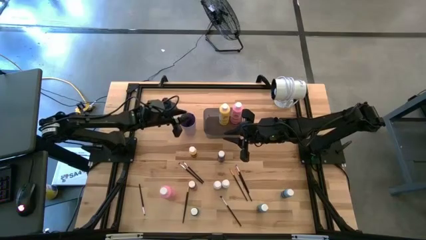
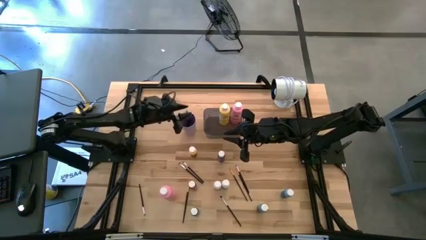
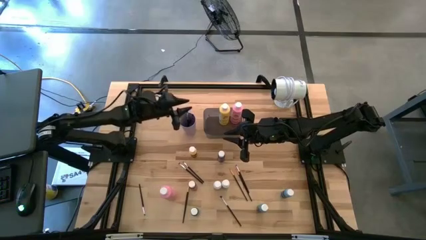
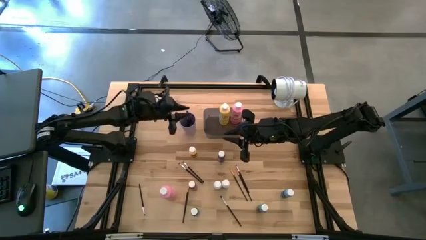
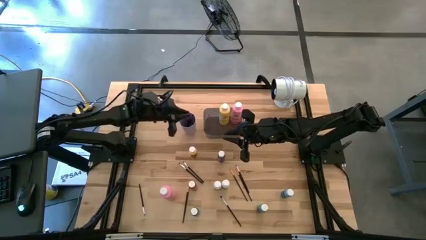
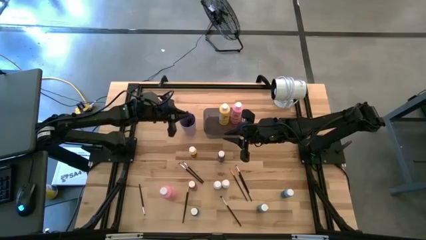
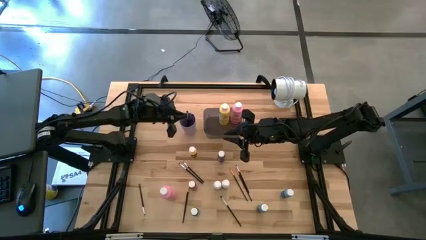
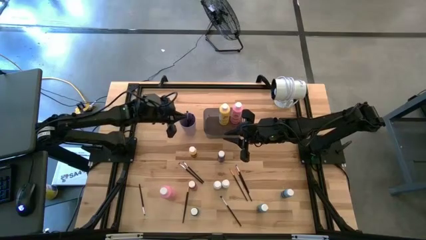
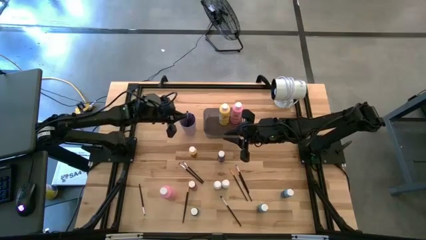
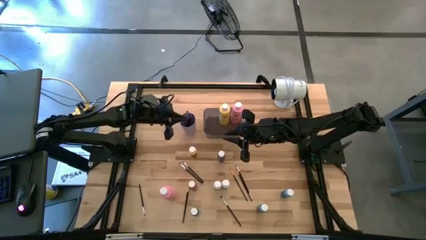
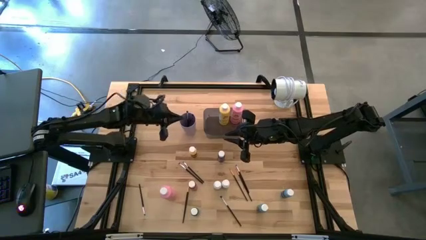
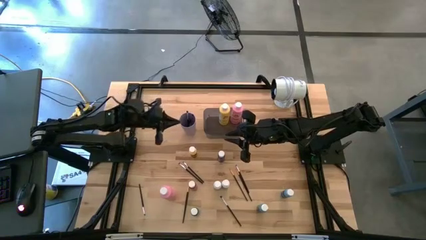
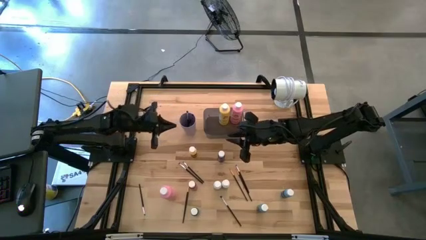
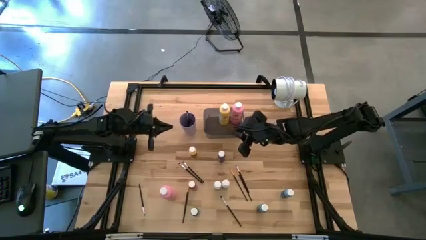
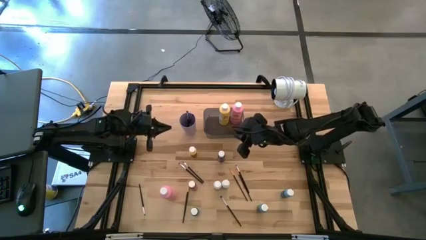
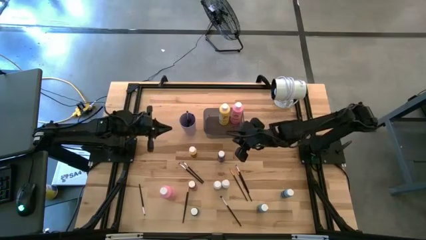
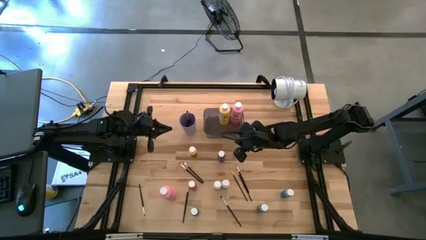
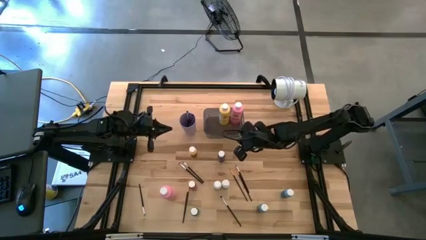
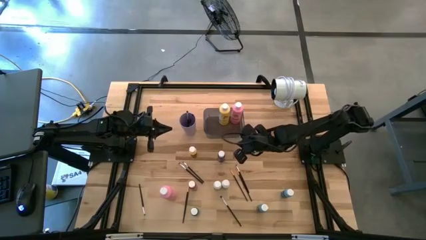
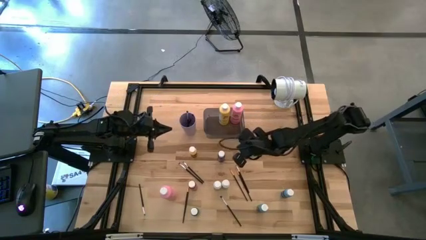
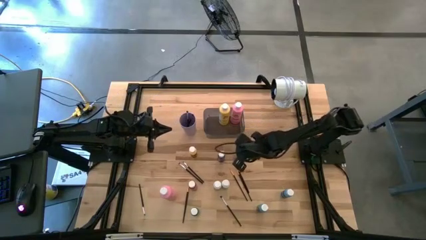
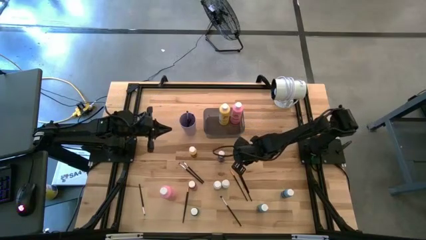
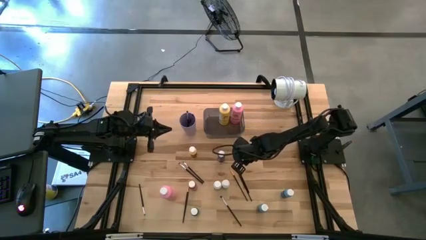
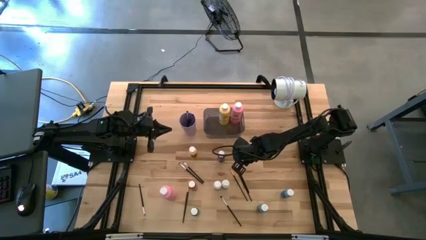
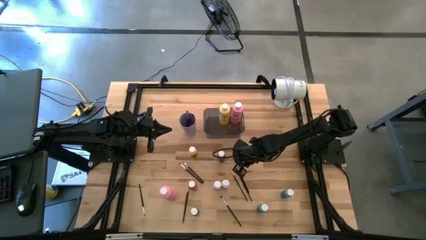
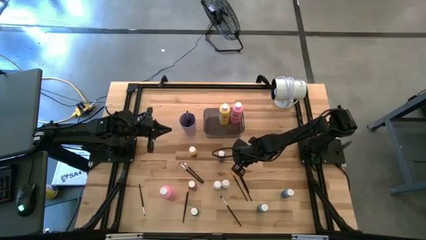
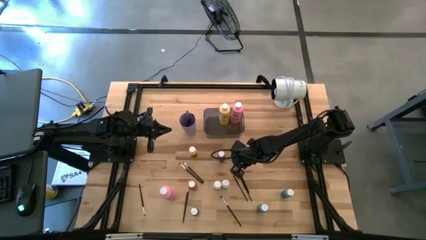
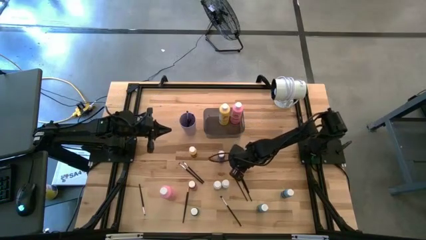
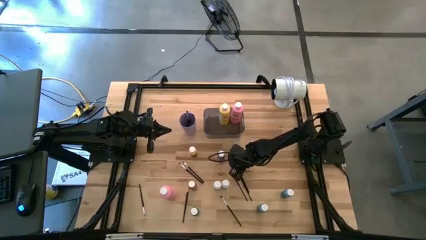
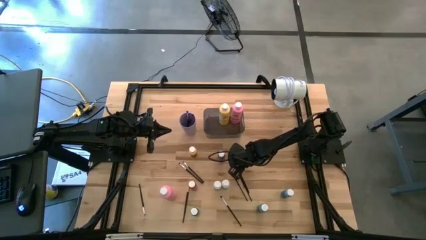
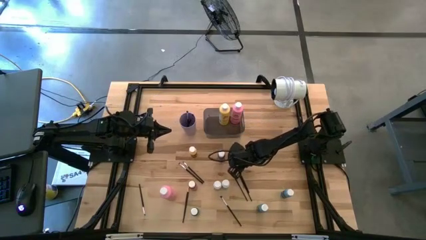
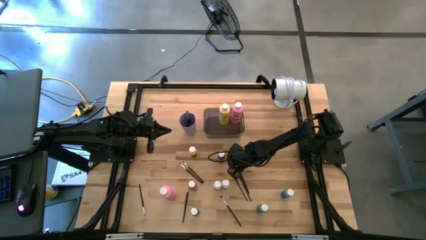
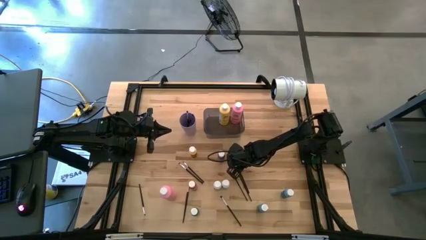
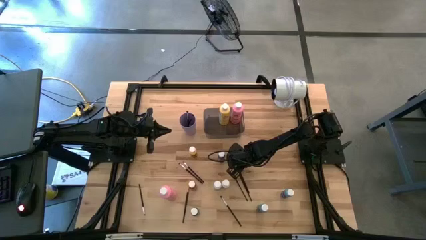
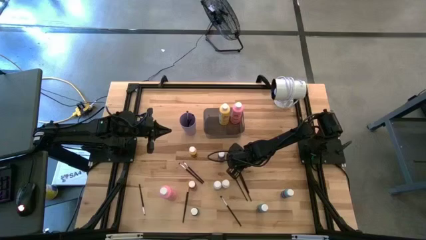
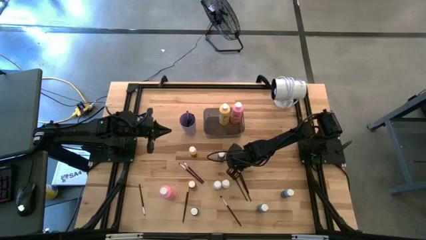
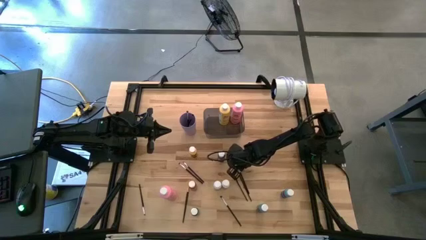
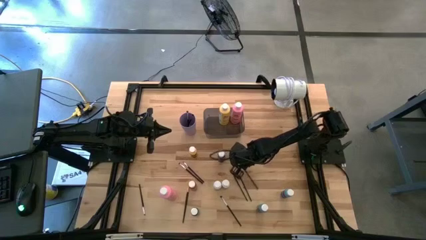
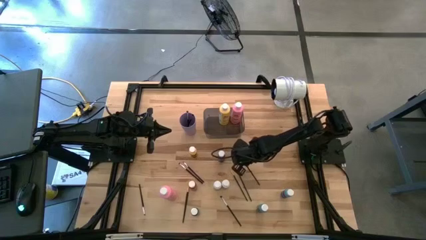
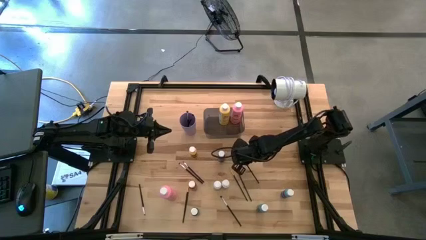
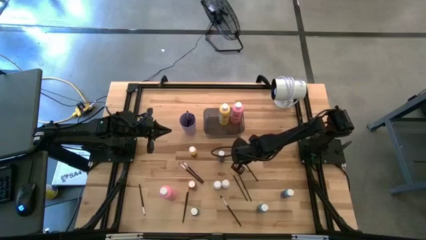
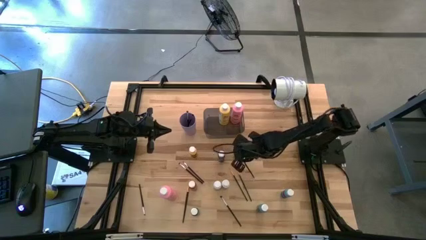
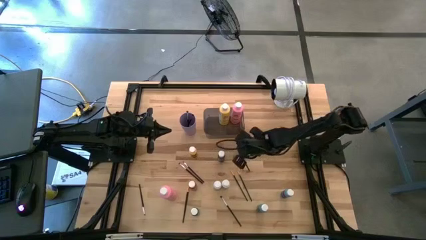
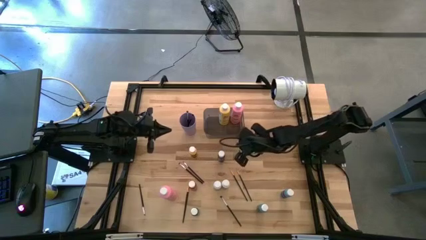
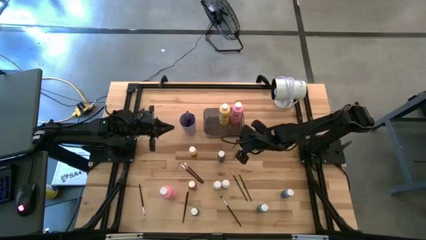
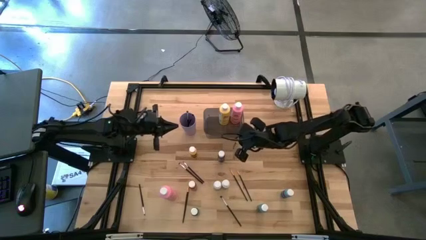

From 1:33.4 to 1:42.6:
Task: Pick & Place Paint Supplies
Put the gold paint brush into the purple cup

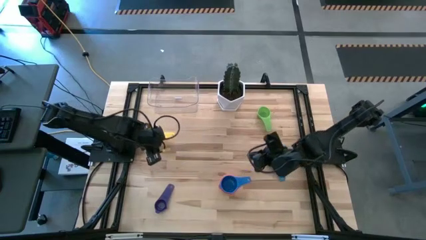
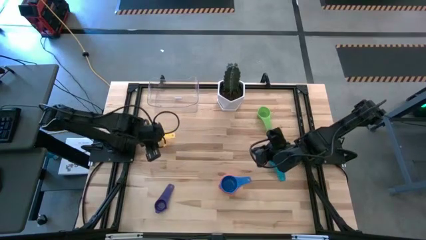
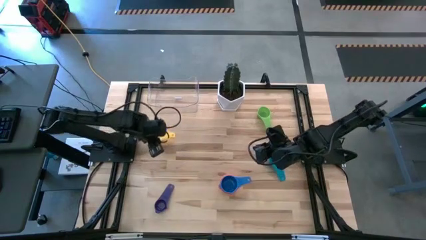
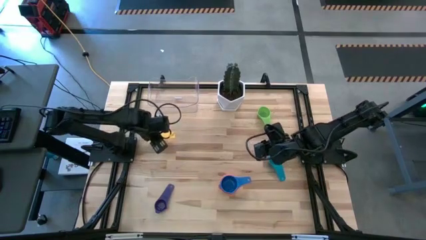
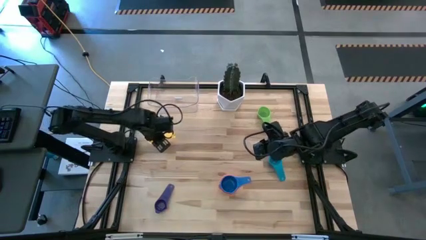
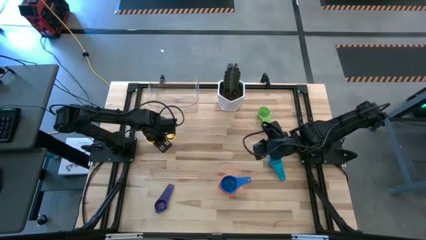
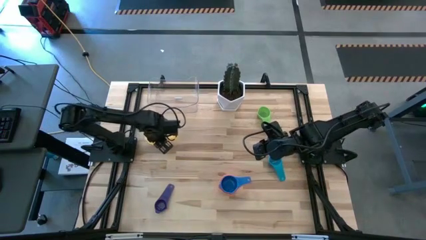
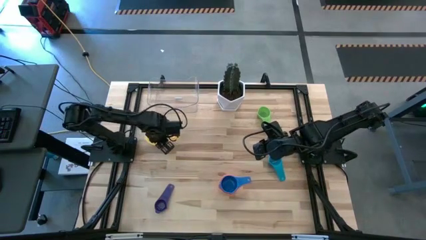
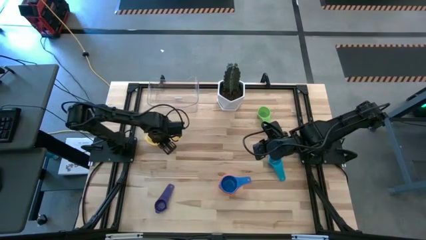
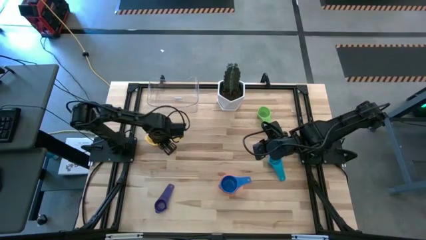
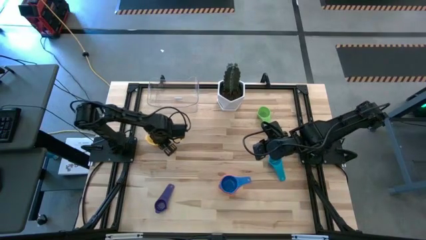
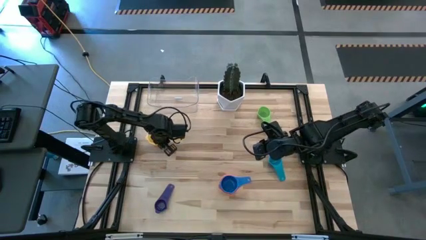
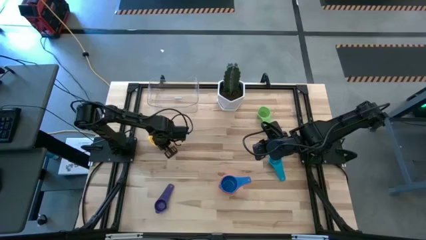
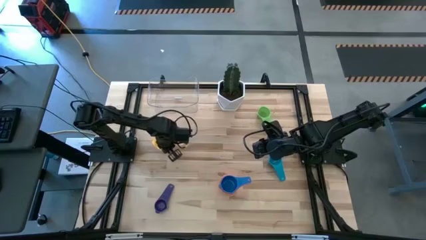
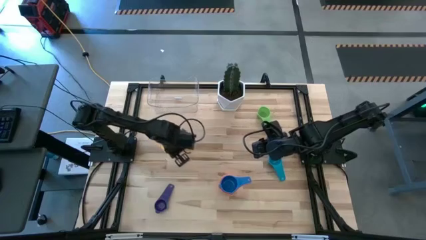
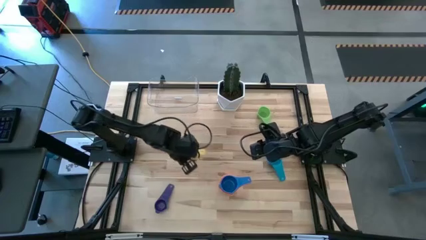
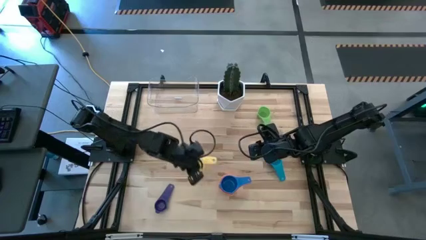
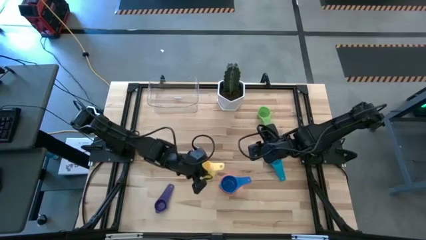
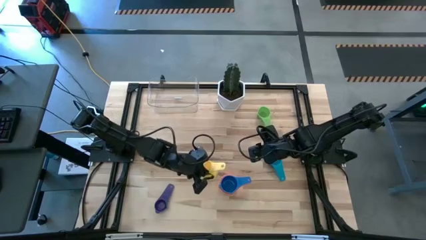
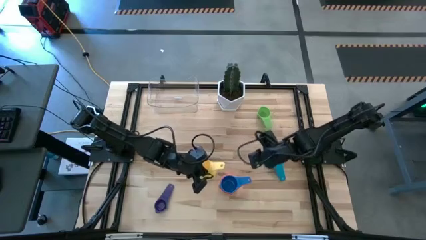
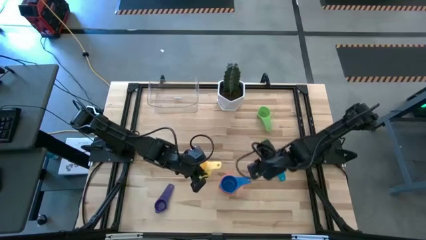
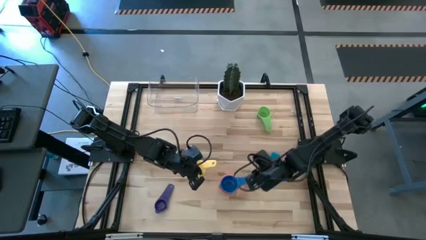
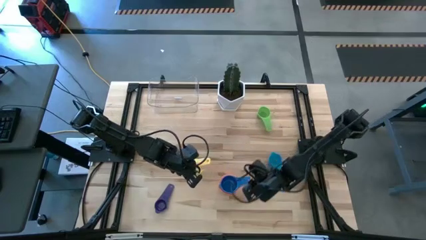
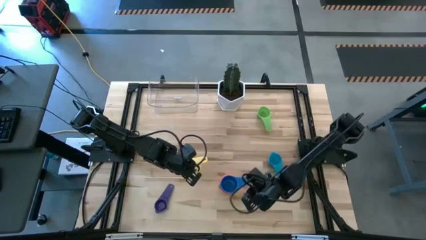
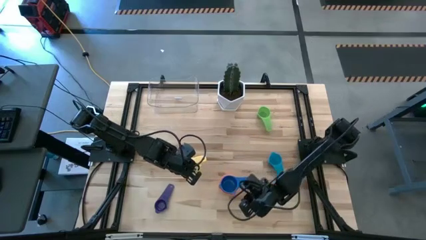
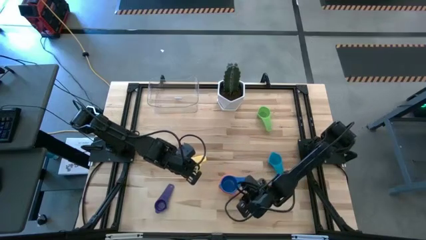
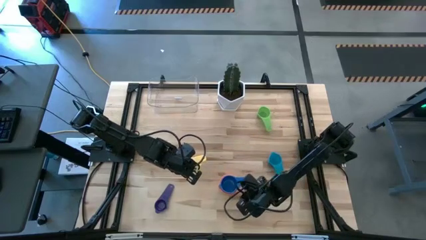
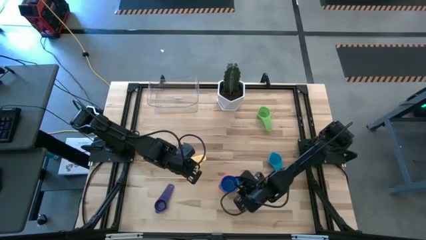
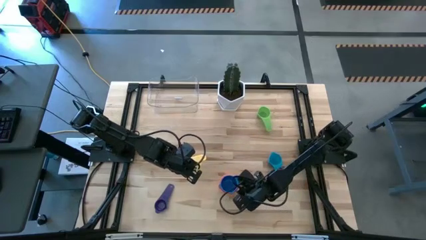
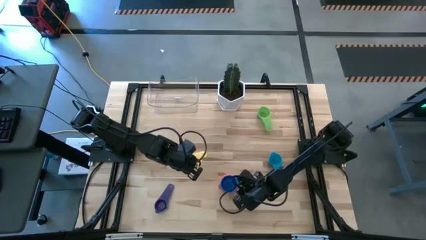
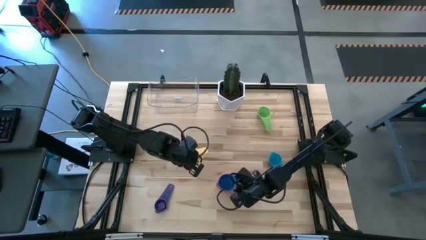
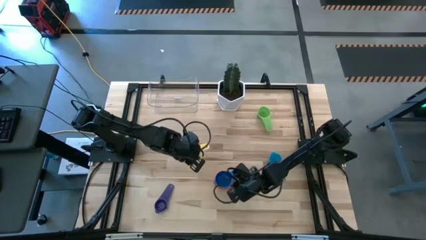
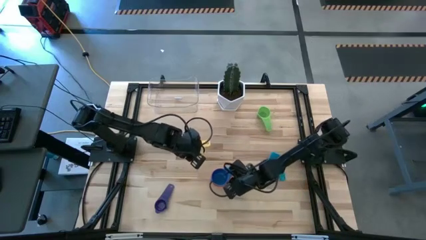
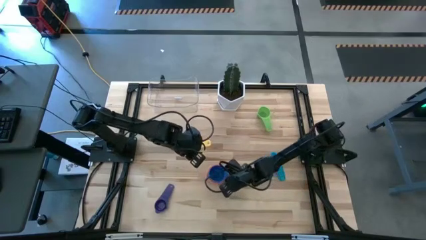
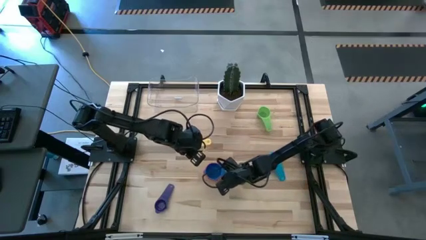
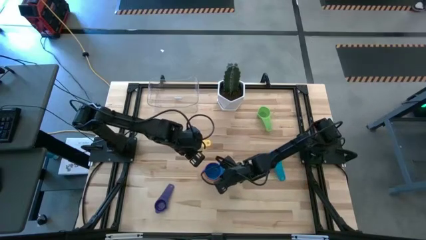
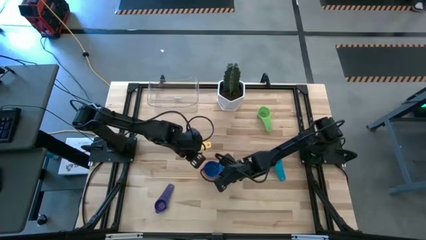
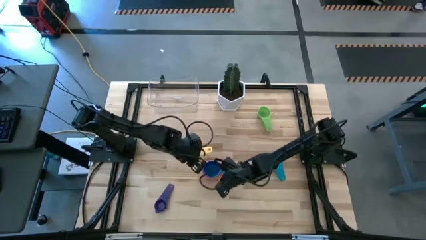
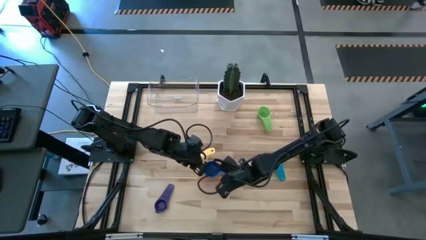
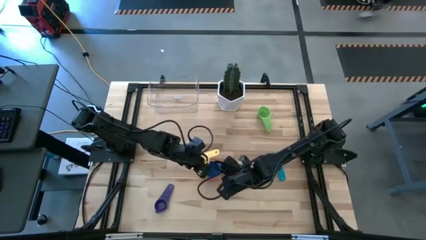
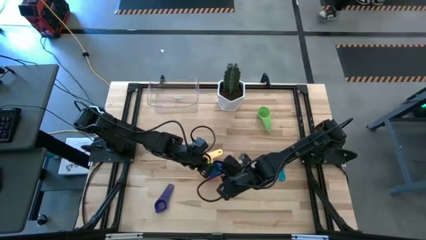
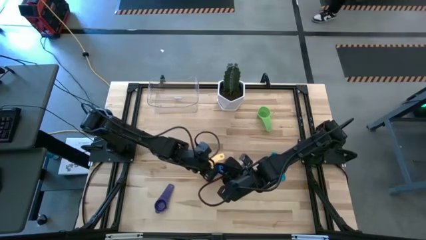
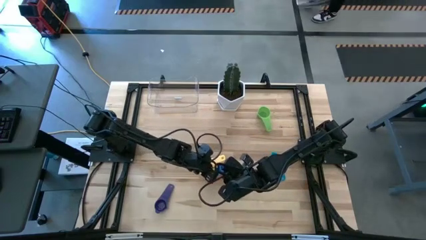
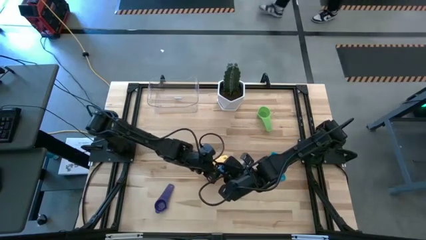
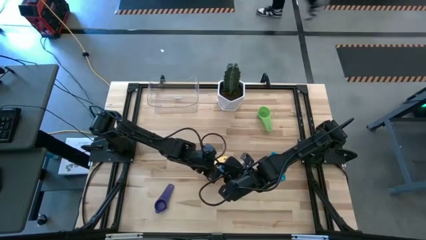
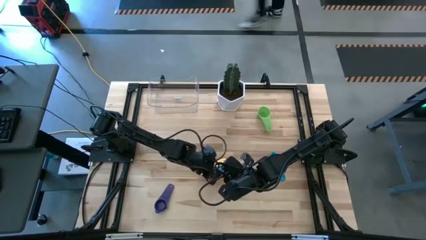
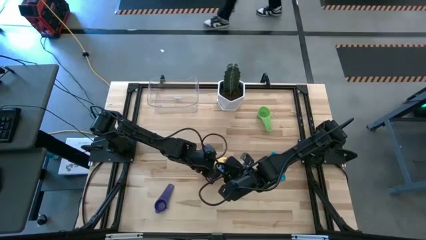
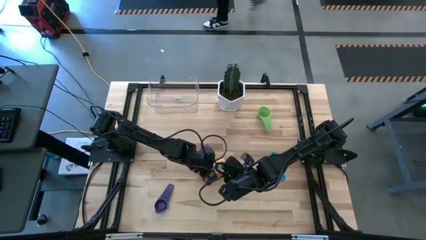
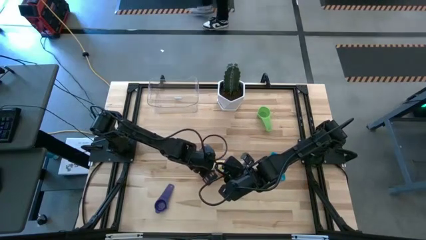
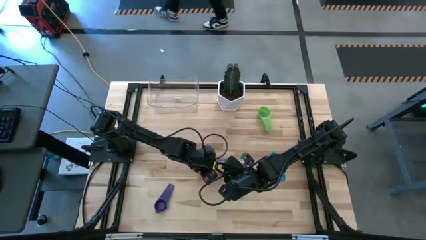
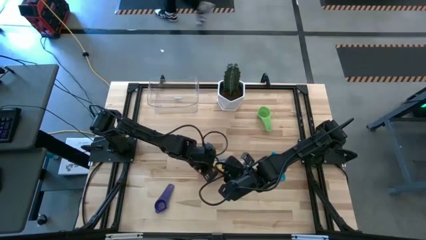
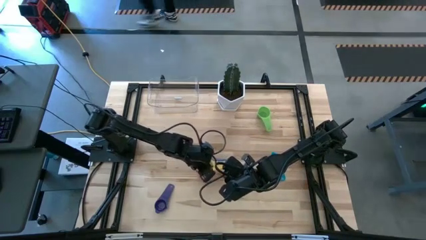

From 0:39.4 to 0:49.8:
Task: Nest measuring cups in basket
Stack the yellow measuring cup on top of the dark blue measuring cup
